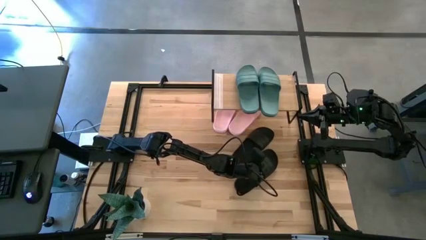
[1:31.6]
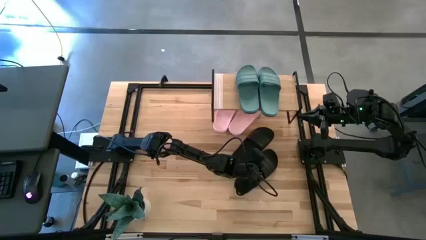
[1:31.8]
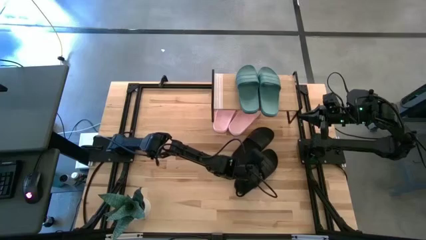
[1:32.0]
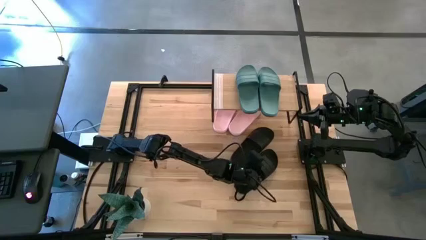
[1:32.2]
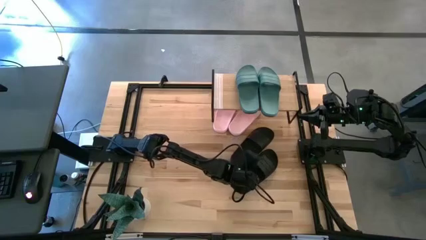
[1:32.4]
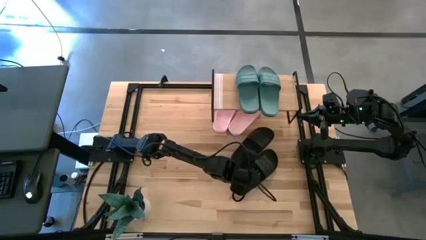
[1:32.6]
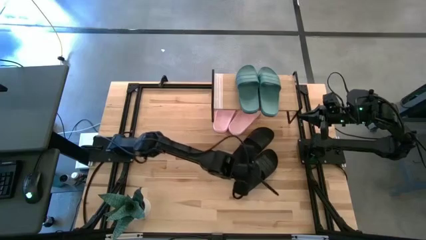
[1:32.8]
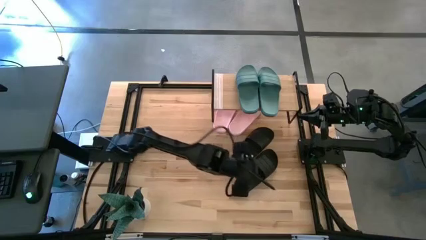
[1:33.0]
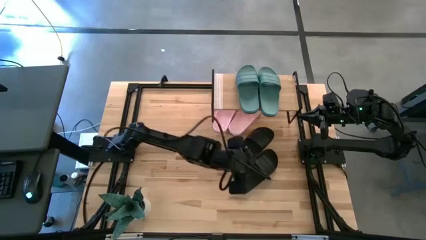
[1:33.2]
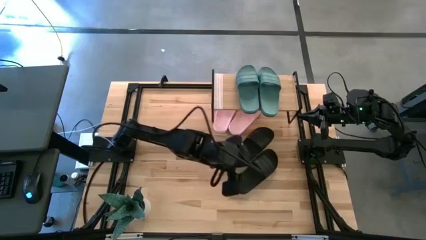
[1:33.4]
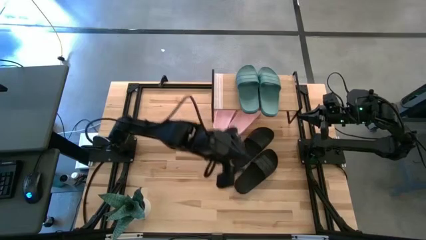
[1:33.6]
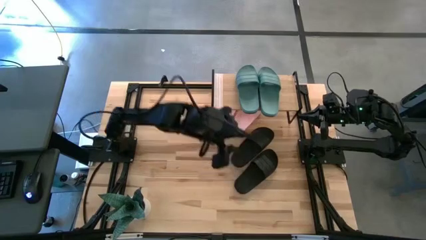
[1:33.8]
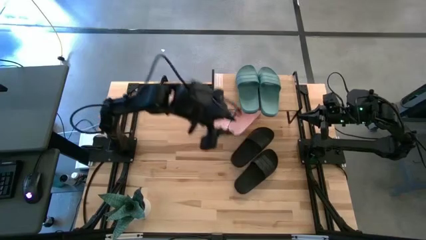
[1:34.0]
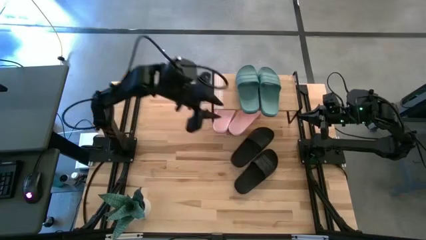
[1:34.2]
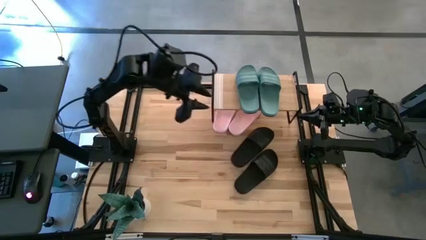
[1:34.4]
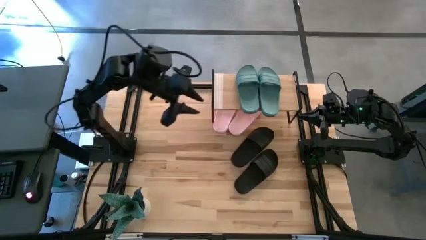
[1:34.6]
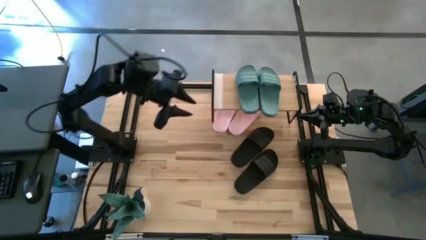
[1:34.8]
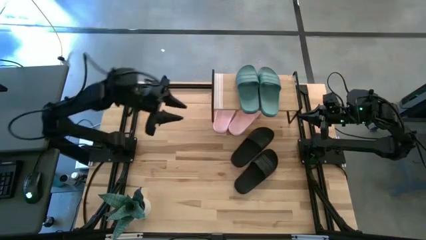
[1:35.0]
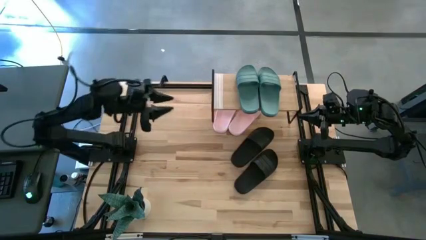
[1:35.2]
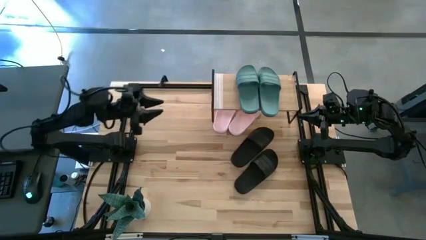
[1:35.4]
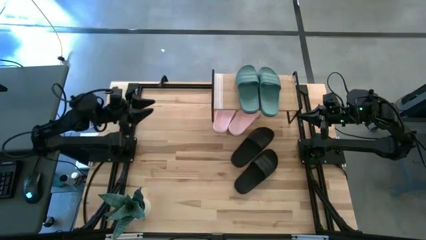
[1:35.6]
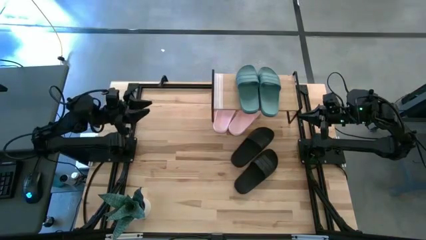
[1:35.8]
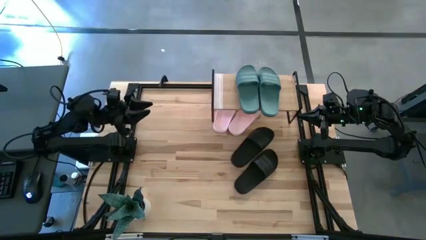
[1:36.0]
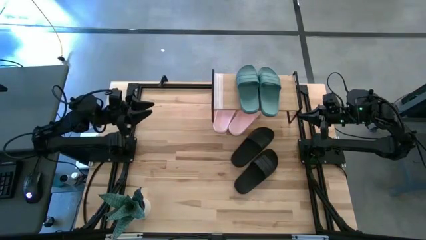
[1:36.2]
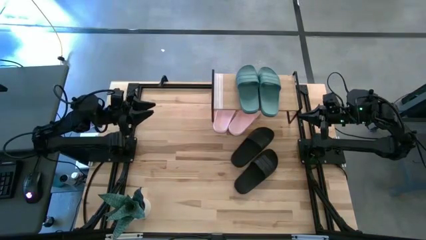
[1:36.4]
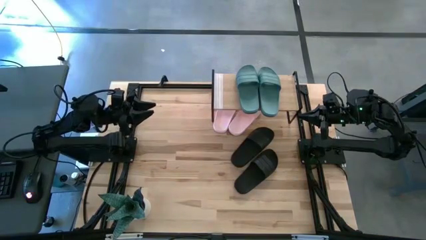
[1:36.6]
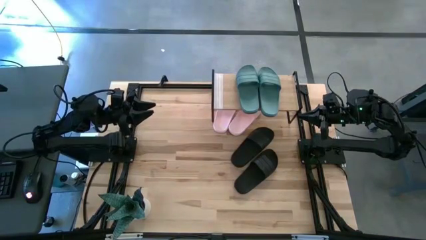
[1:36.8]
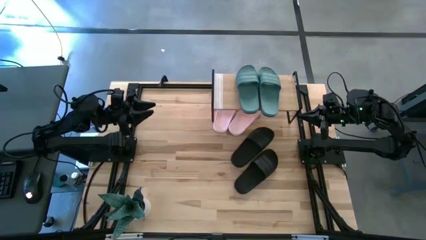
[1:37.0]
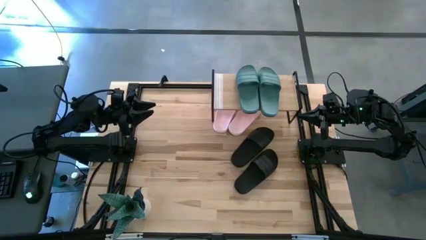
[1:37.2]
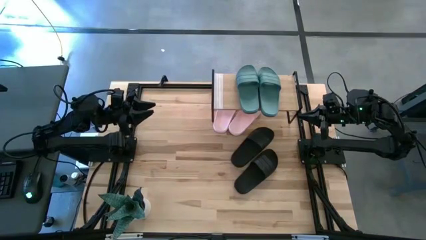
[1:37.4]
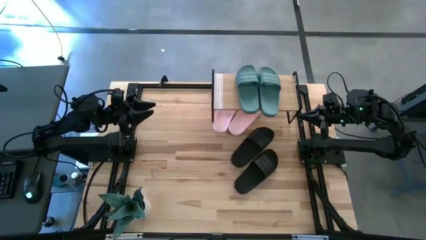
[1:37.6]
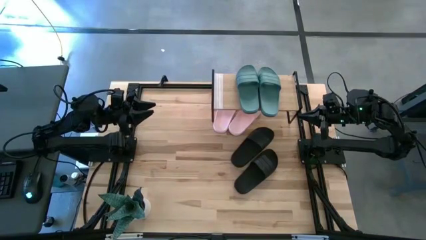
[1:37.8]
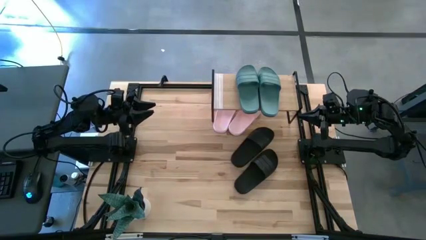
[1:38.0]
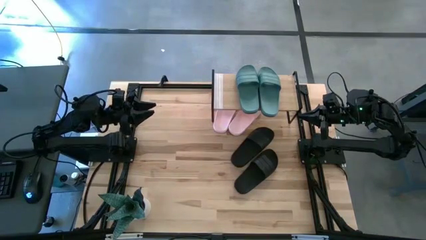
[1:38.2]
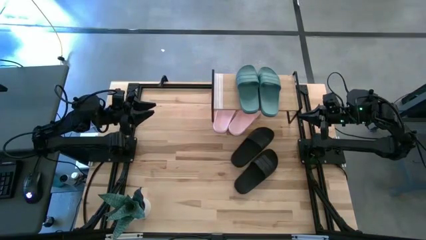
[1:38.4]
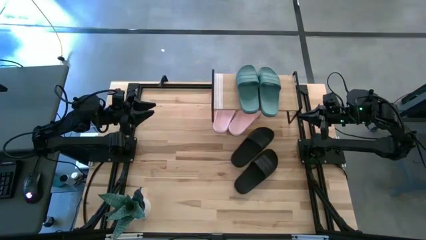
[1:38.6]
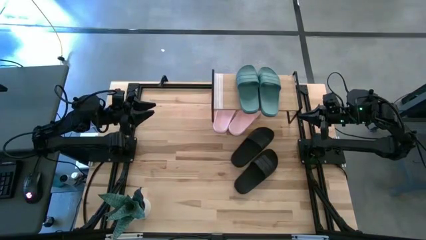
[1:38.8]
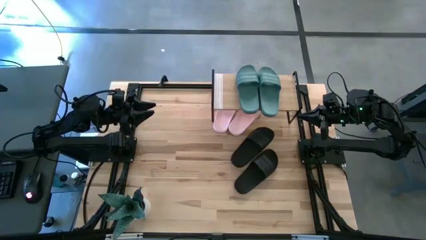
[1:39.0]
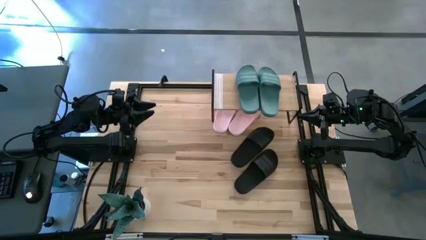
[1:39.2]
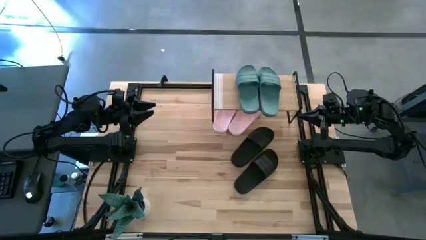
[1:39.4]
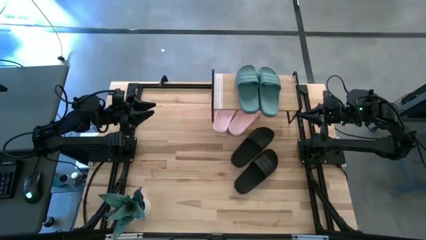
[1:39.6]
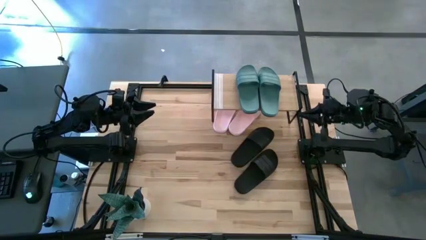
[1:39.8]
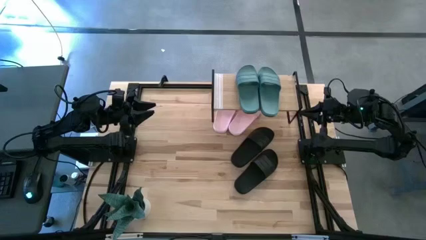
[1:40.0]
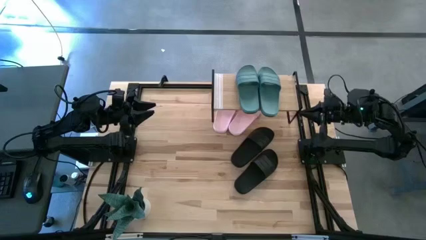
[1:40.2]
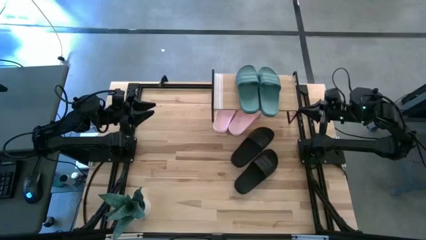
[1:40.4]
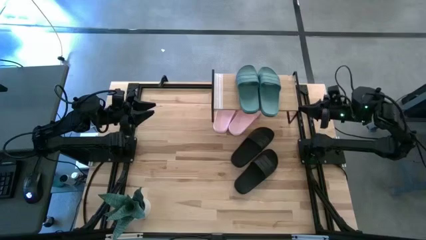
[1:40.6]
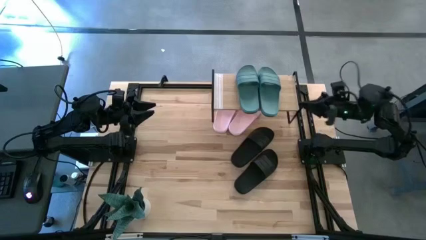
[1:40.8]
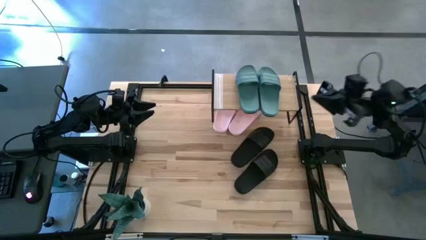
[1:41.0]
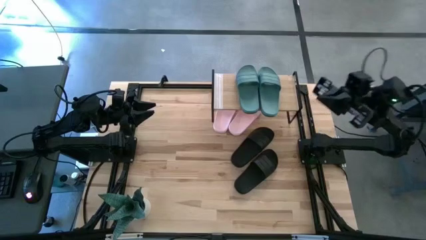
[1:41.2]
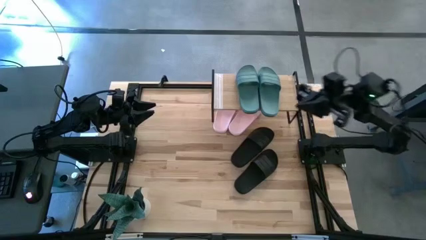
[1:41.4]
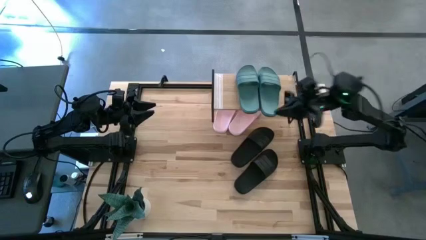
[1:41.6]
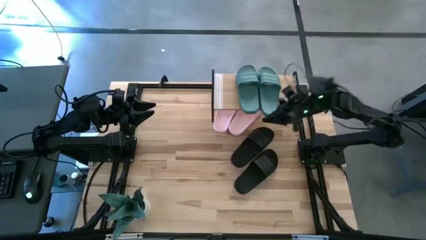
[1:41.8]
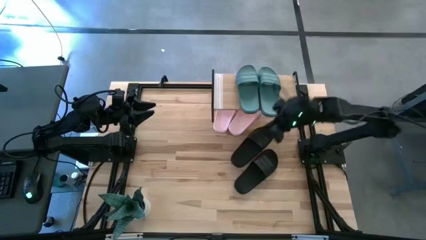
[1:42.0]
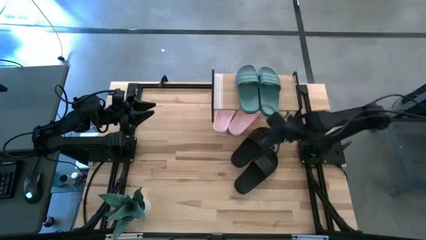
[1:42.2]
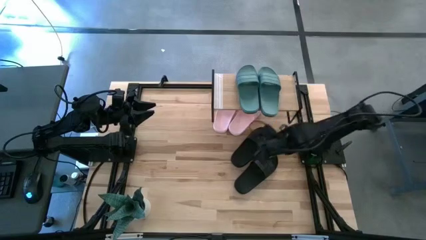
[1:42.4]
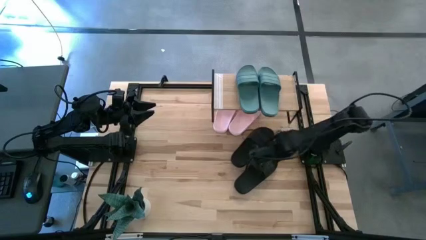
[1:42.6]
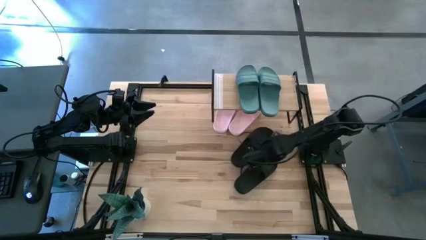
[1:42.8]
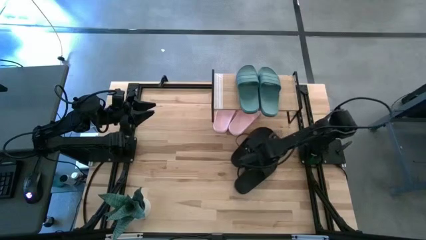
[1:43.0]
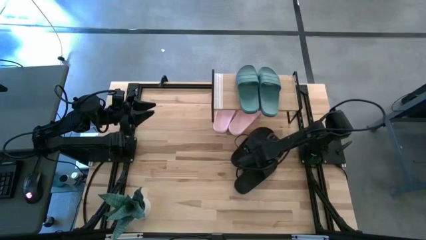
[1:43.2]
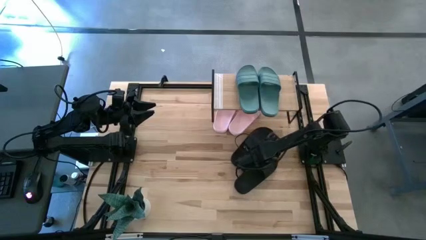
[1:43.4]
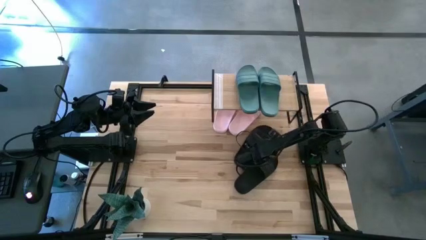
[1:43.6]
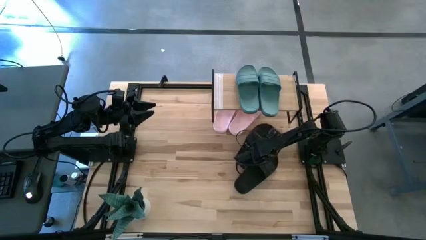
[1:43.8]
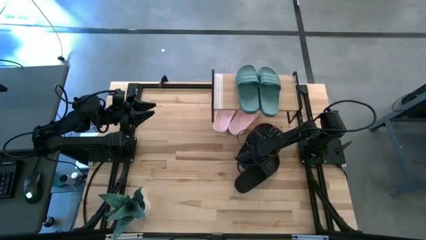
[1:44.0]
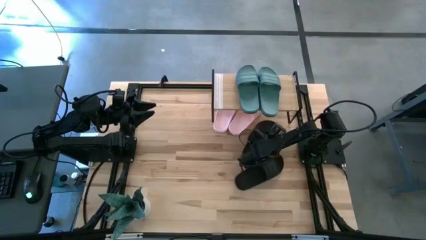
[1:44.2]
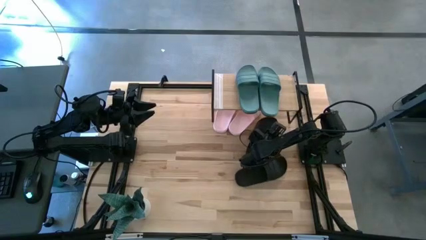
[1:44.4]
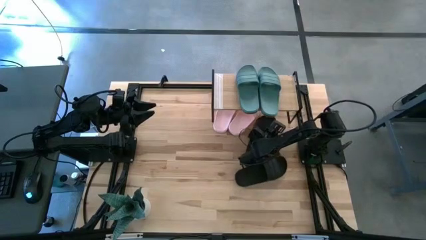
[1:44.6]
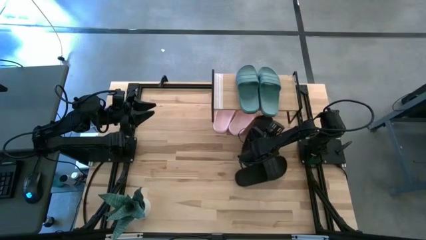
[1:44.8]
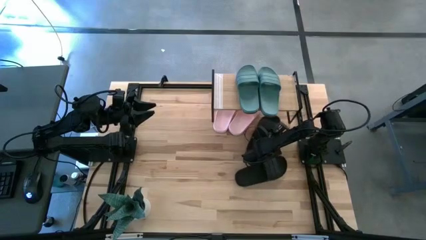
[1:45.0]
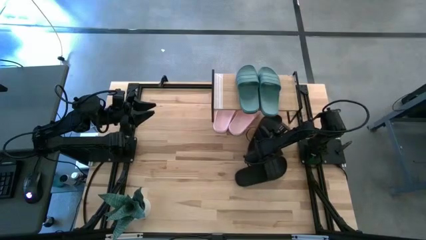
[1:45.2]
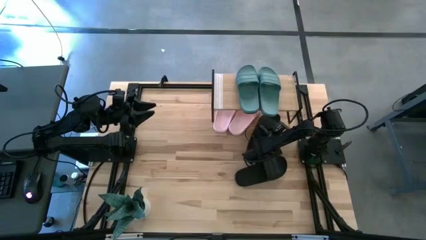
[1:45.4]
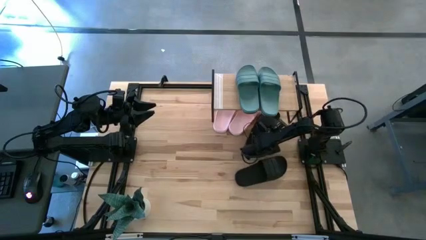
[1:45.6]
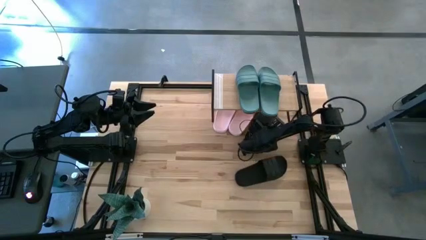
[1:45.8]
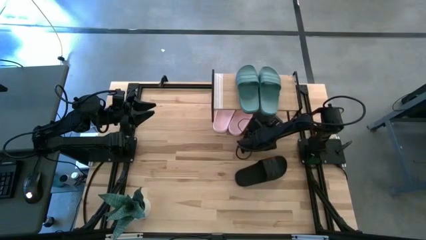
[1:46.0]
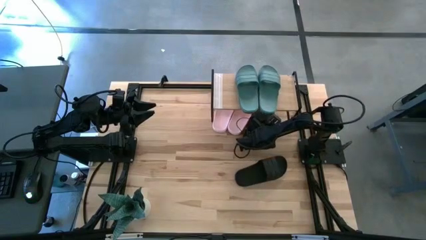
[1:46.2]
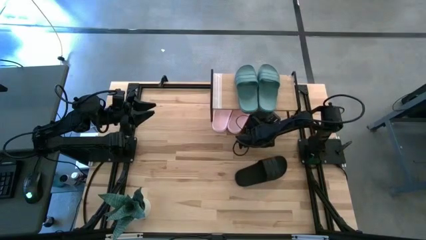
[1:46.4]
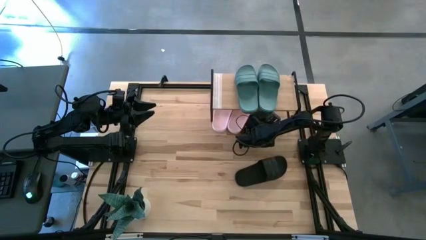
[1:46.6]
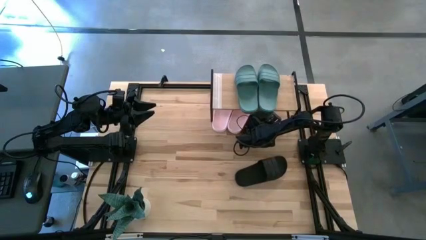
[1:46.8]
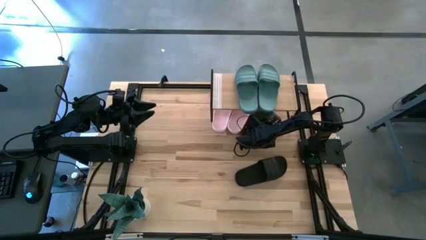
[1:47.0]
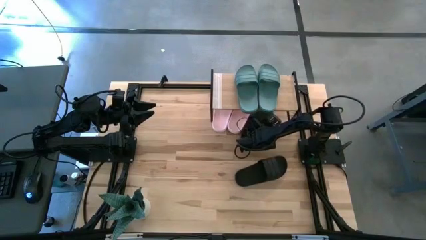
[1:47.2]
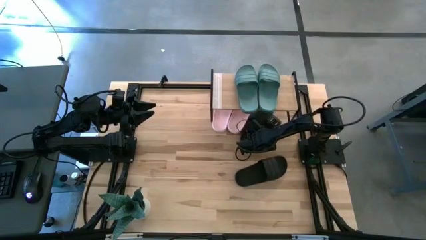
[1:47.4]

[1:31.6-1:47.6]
Task: Pick and place slides into the shelf
Put the left black slide under the shelf
